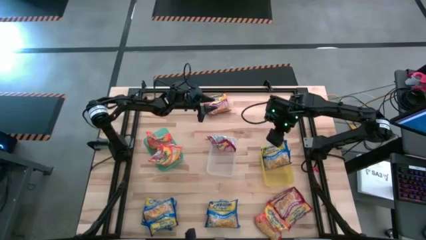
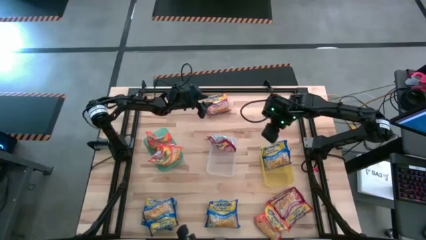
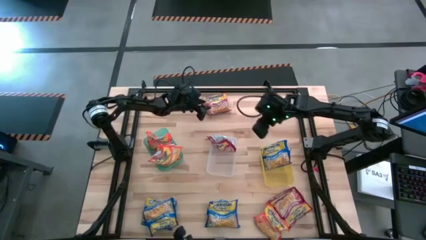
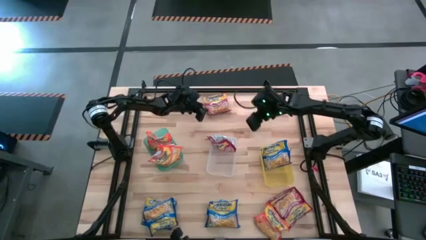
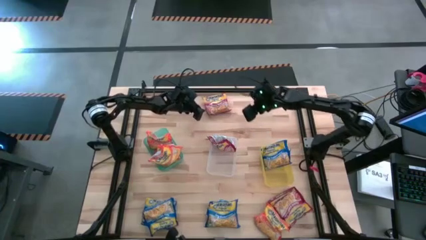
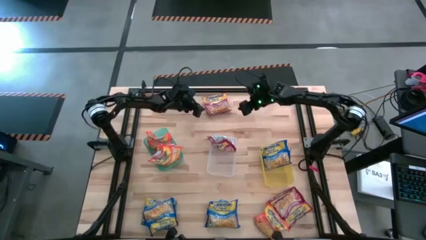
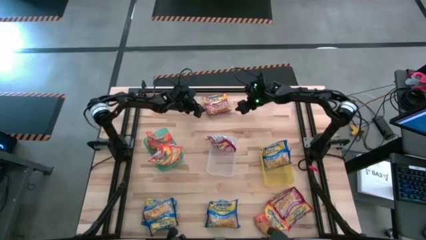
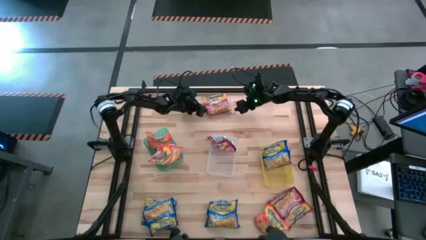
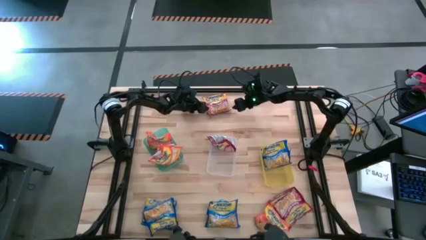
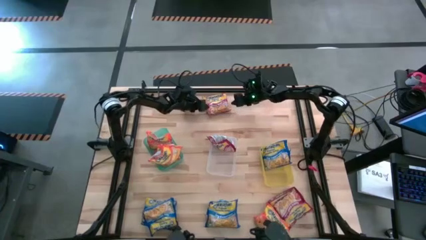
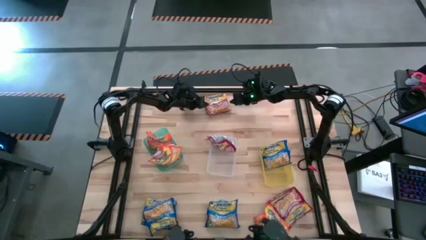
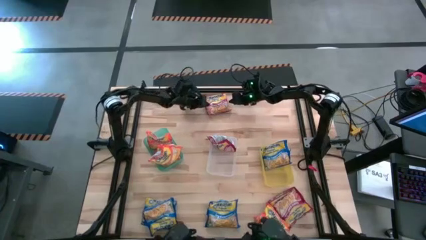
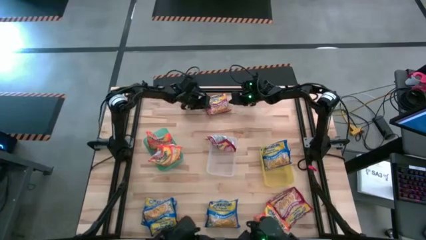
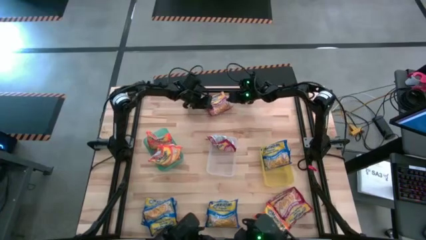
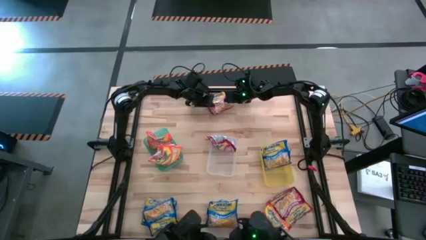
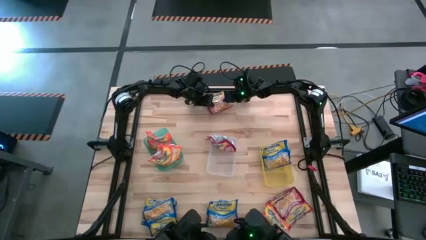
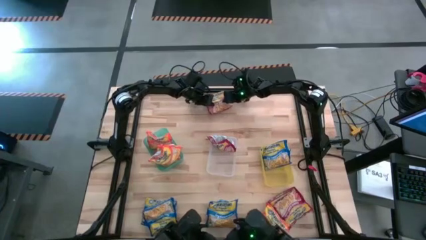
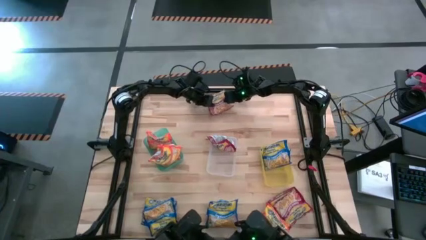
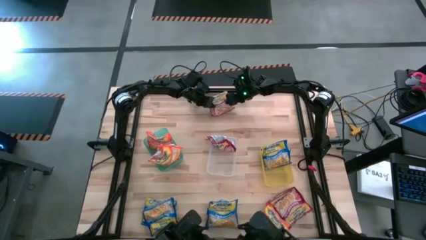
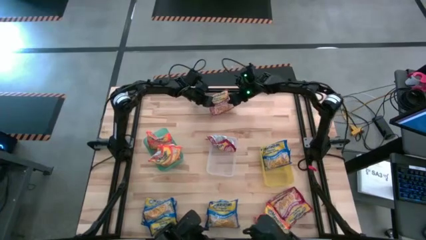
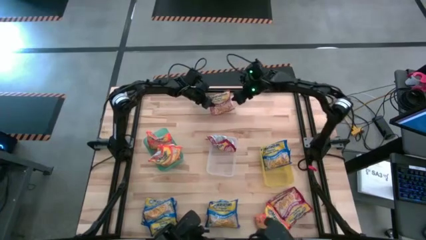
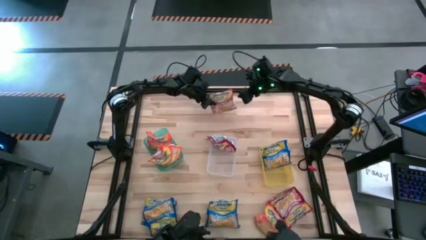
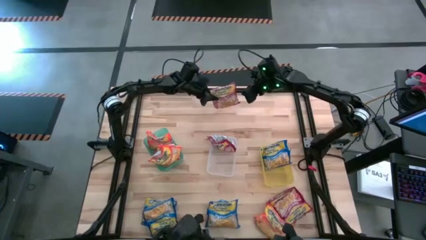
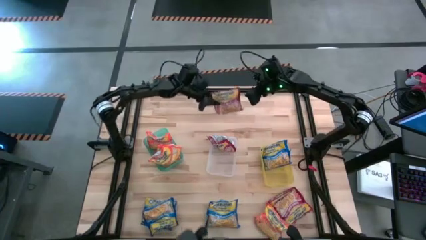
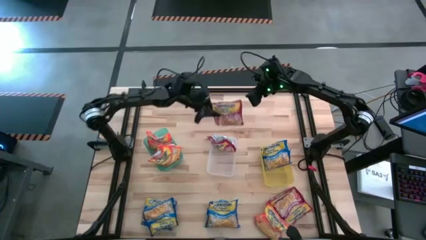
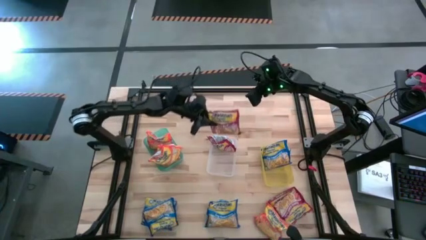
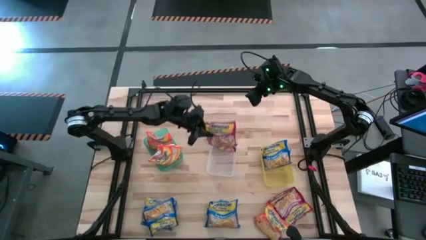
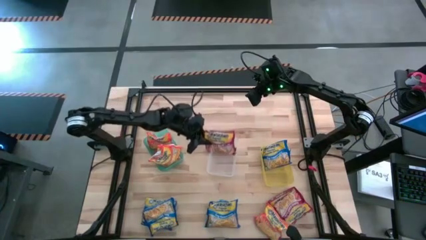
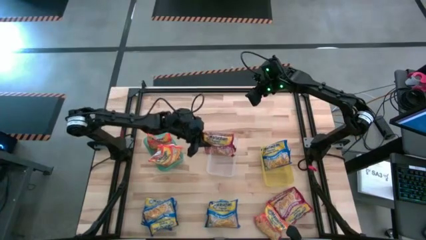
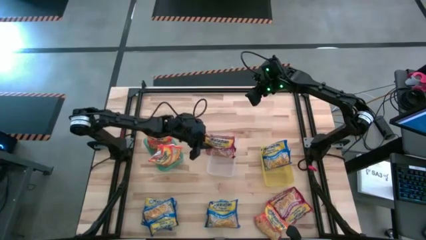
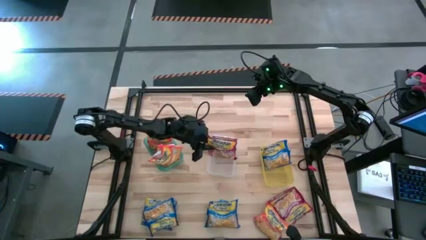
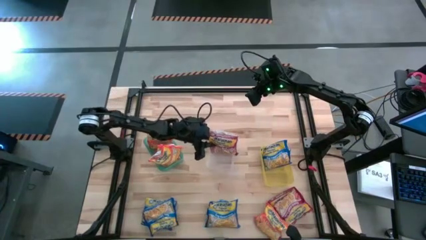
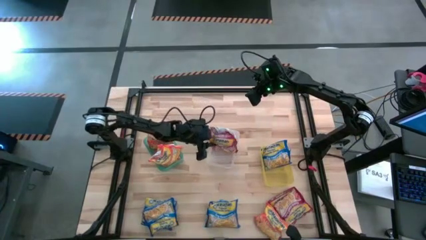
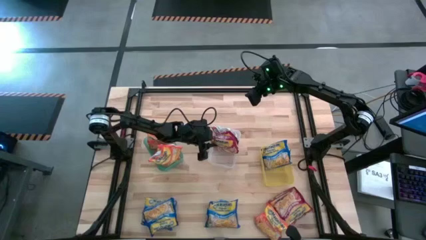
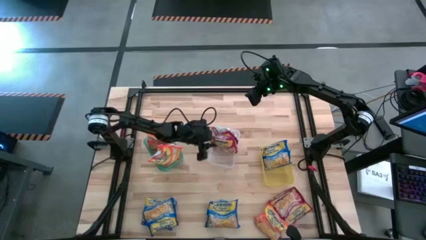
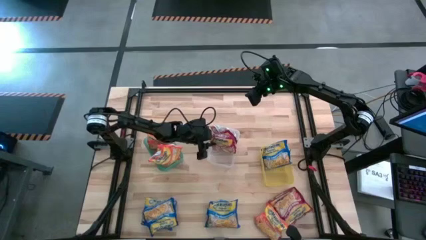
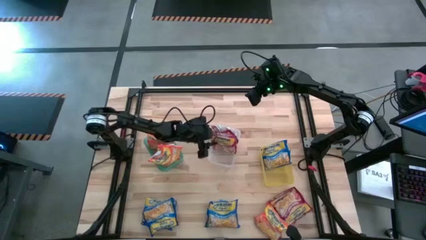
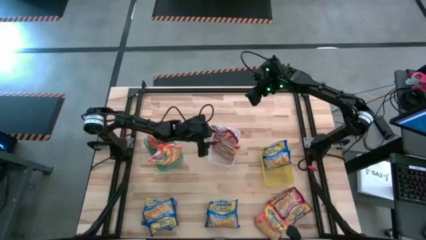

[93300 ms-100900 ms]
Task: Sort Maruchan noodles
Put the red noodle pack into the white bin

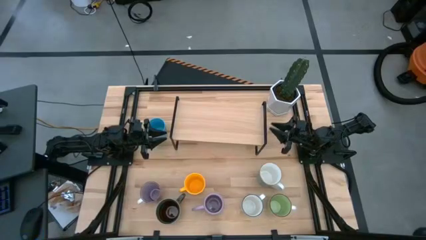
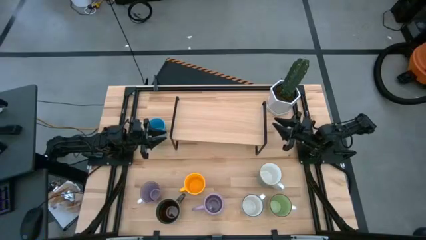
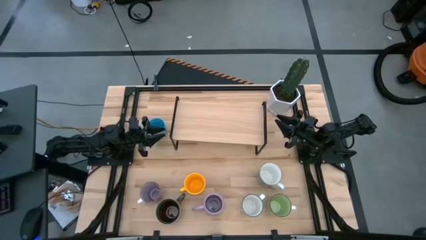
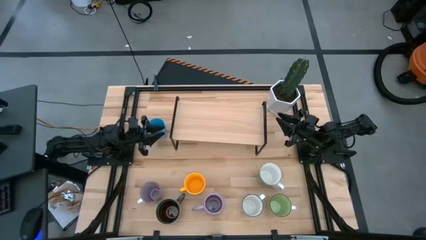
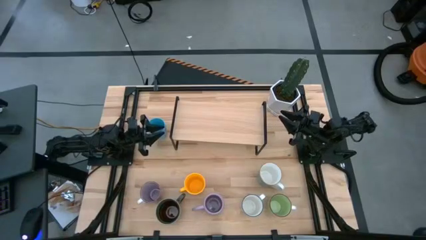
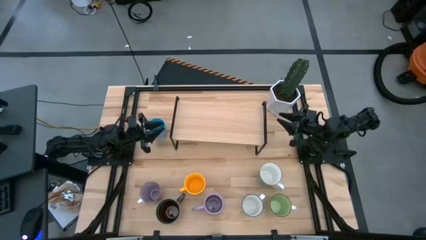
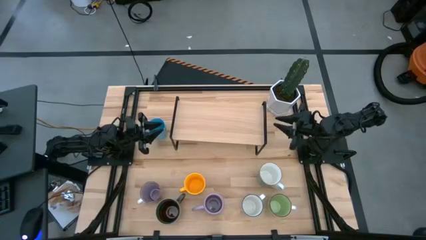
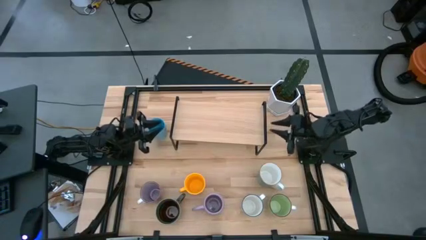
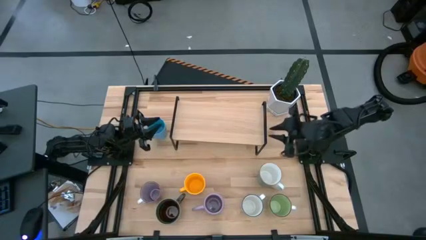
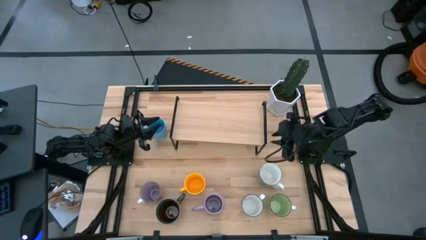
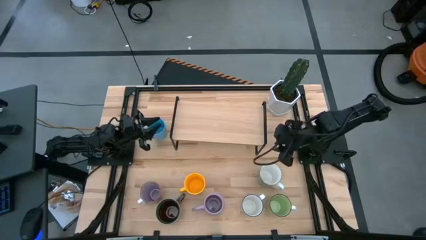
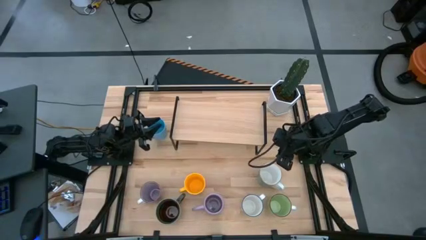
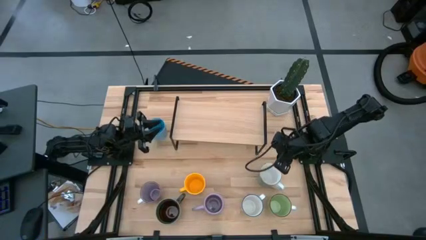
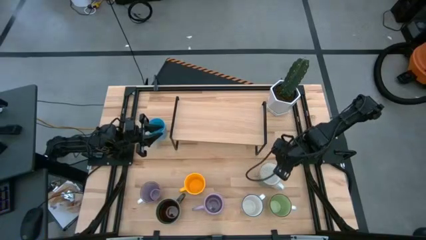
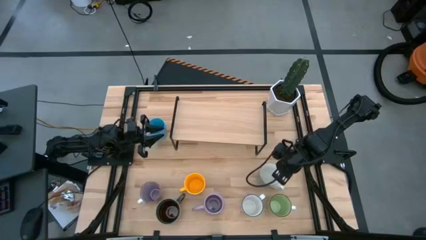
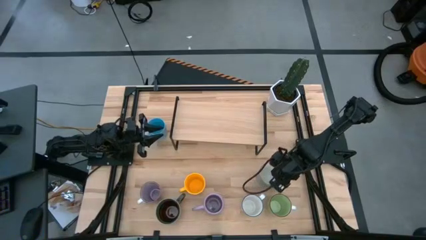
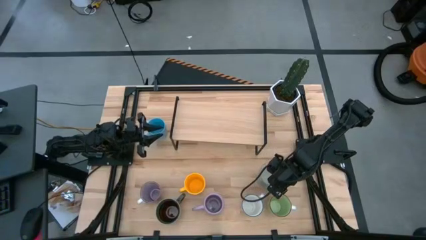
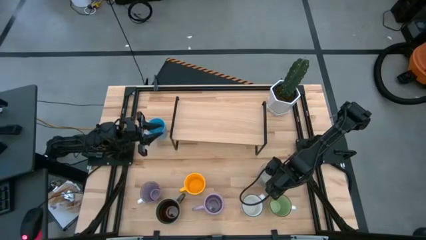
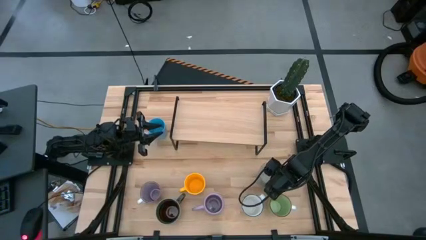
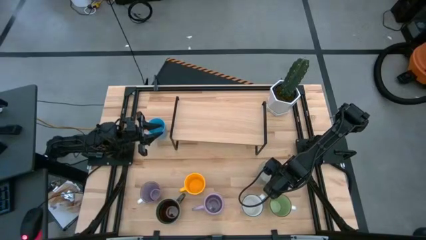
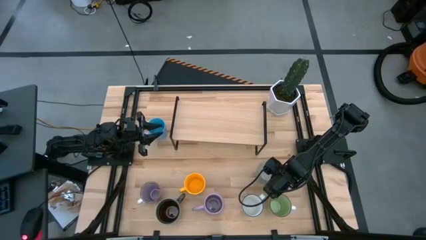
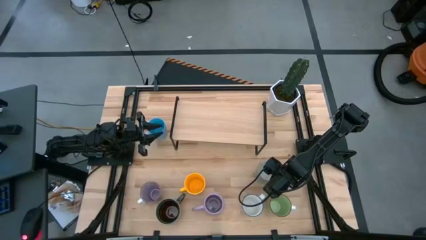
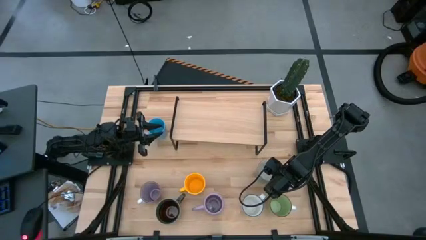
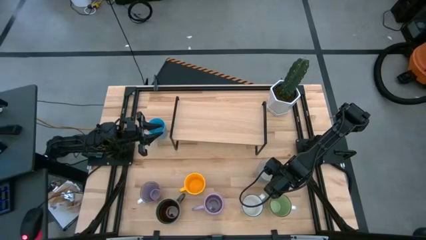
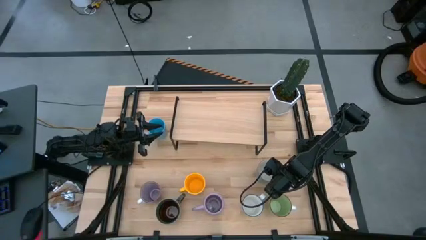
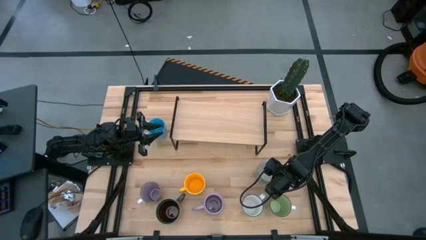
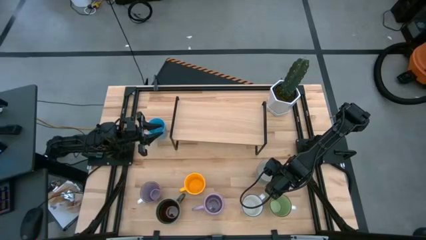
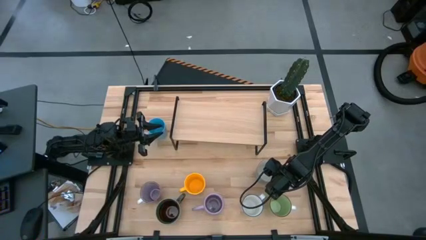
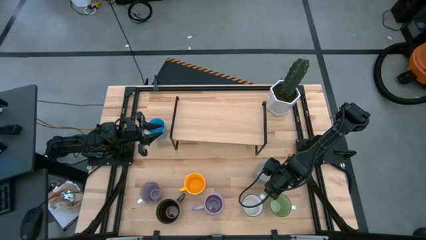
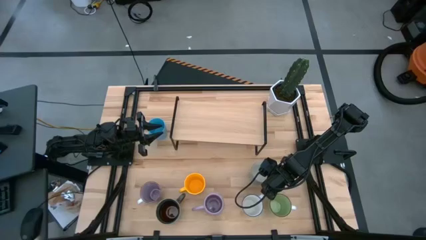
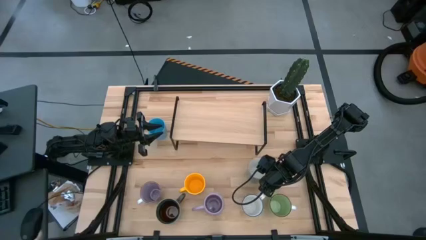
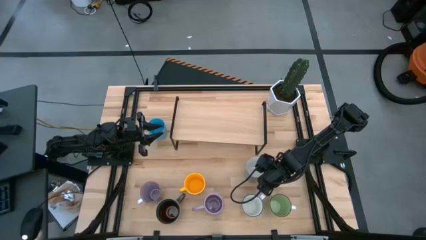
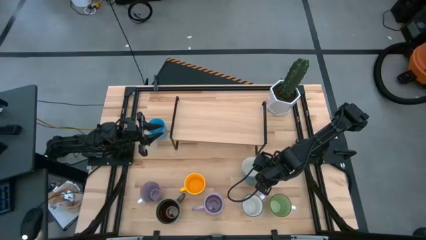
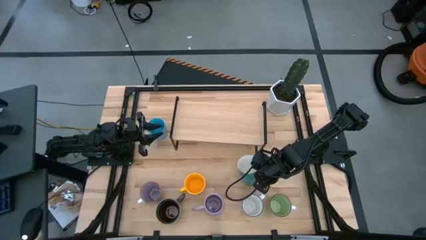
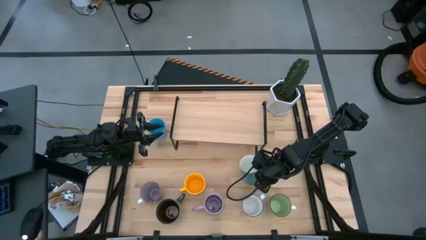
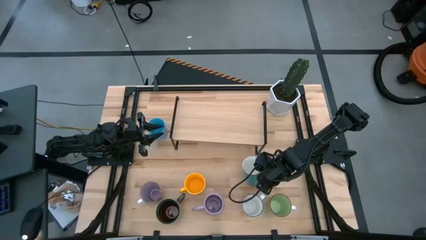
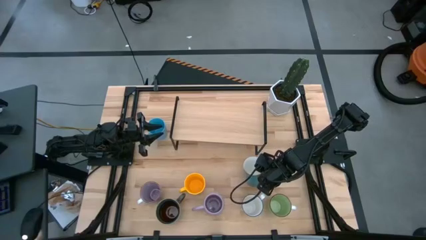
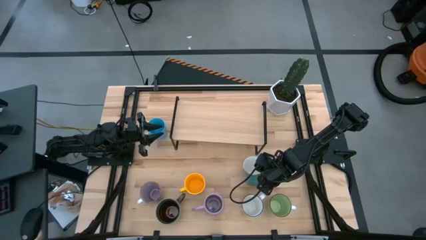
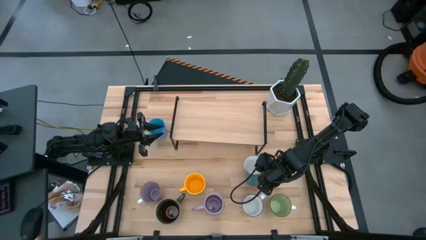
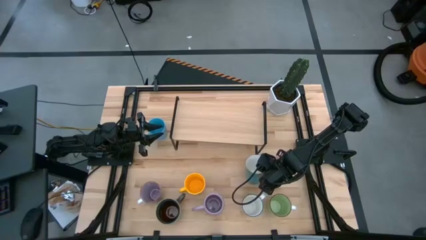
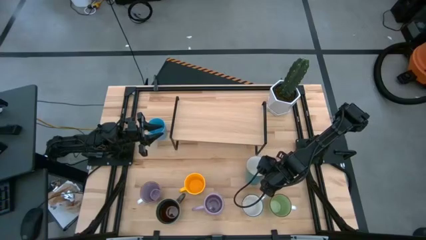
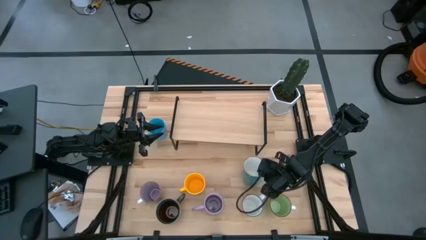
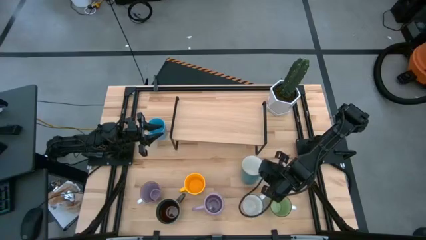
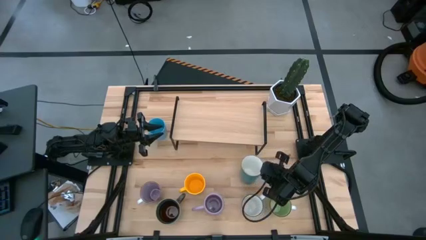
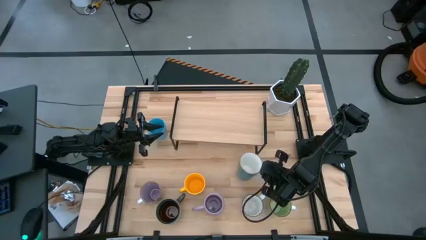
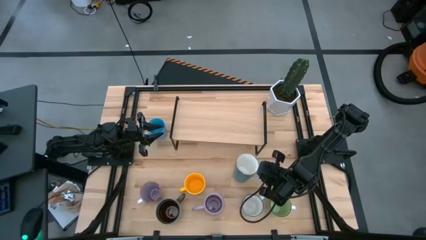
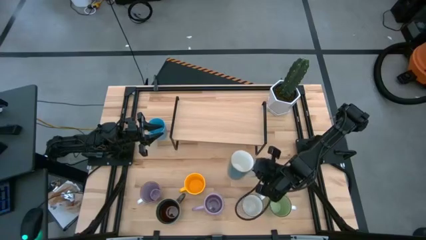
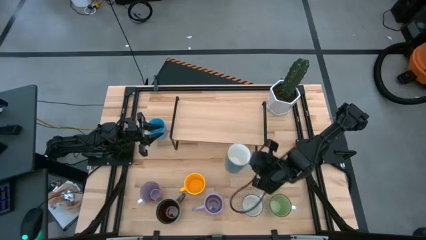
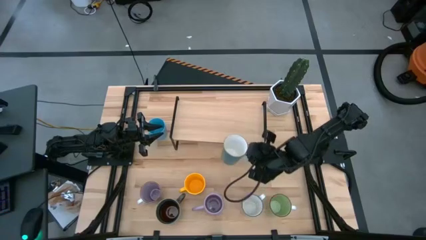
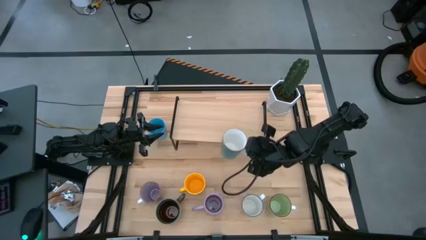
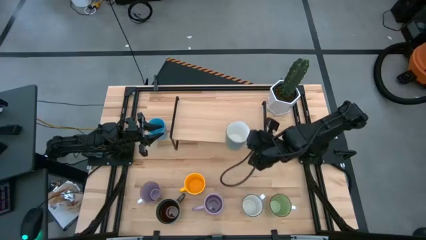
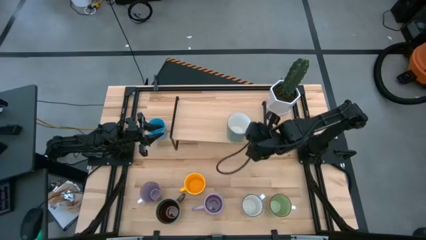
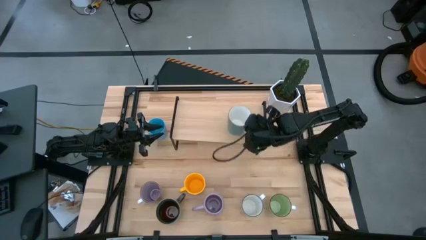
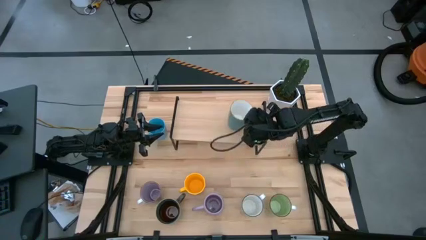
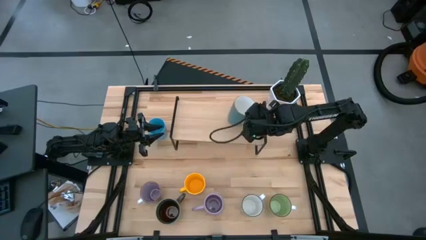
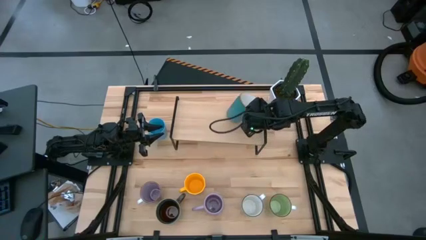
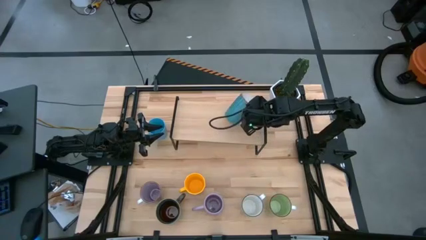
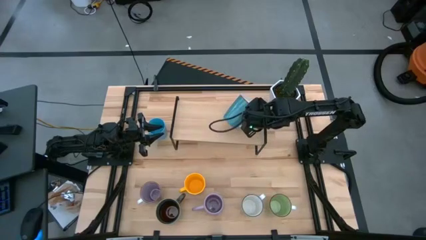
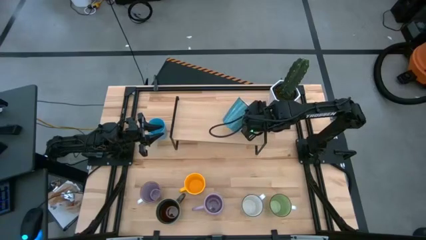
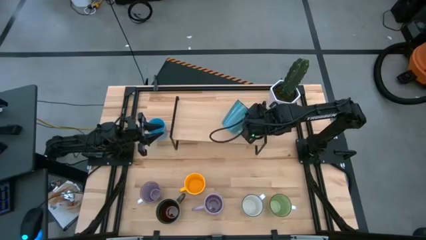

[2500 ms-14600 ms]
Task: Place coffee mugs
Put the blue mug on the shelf
